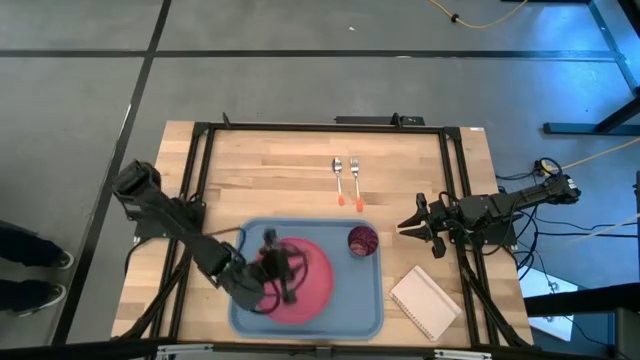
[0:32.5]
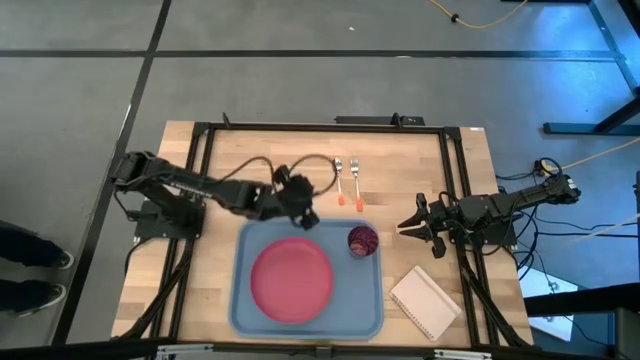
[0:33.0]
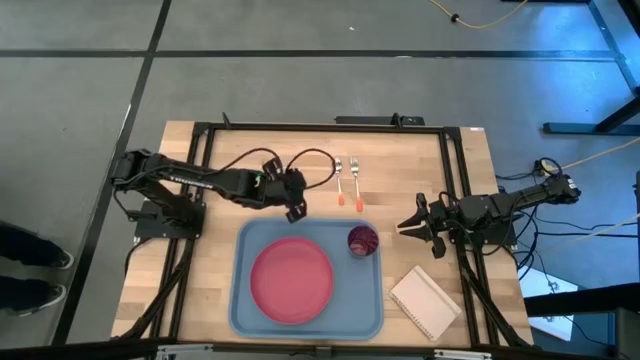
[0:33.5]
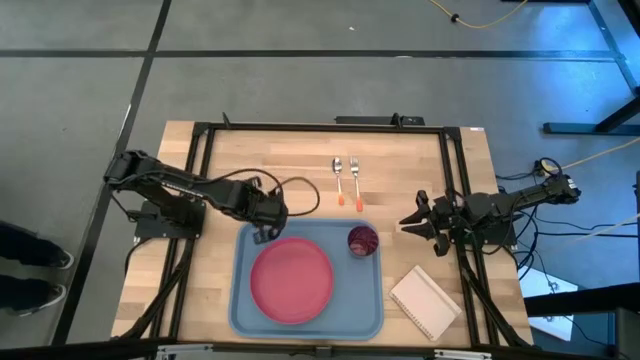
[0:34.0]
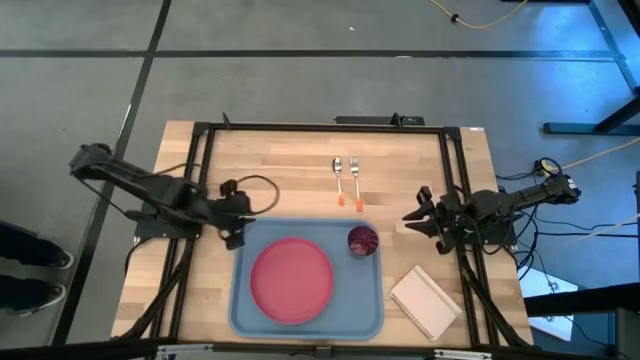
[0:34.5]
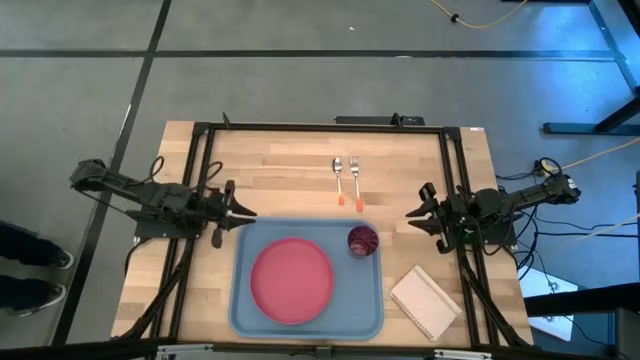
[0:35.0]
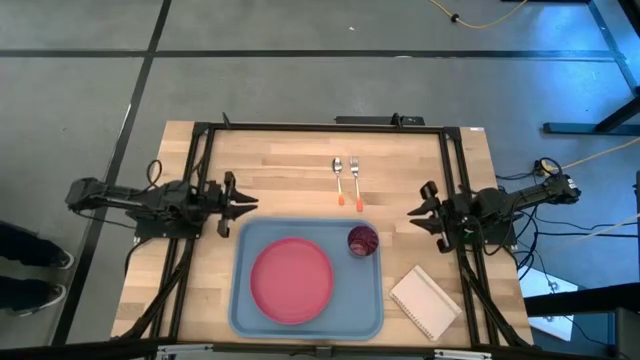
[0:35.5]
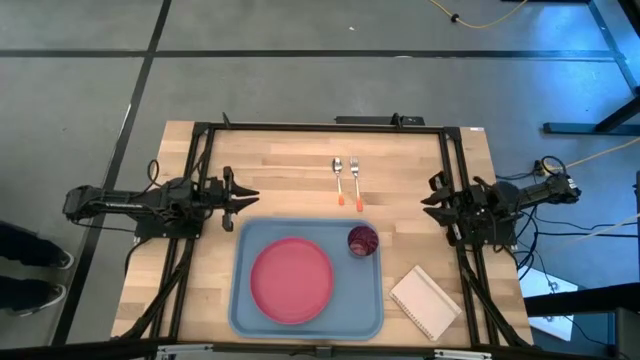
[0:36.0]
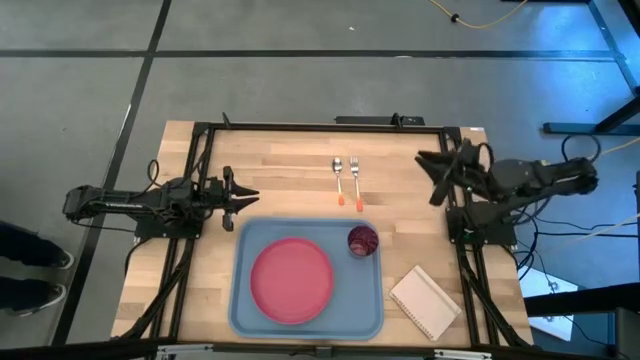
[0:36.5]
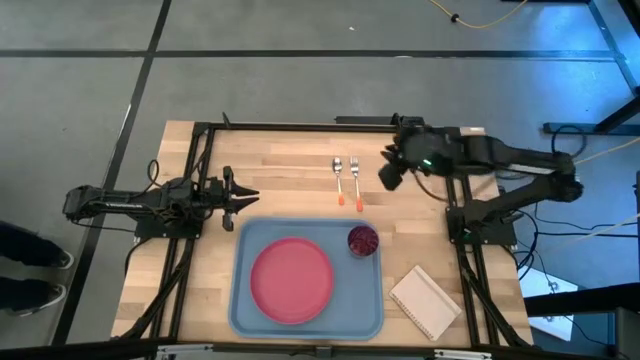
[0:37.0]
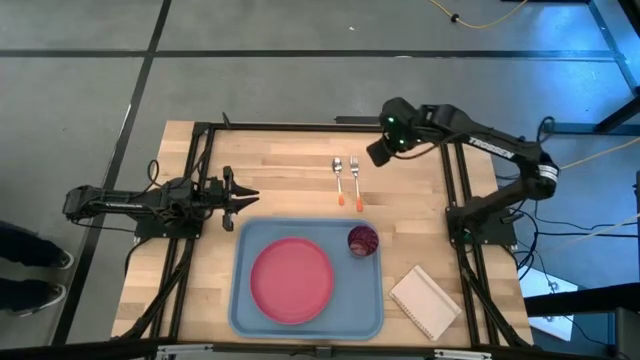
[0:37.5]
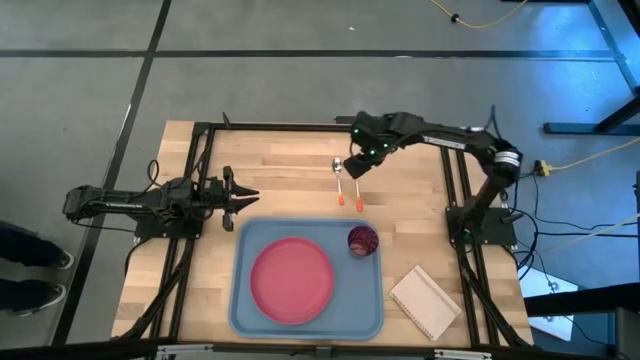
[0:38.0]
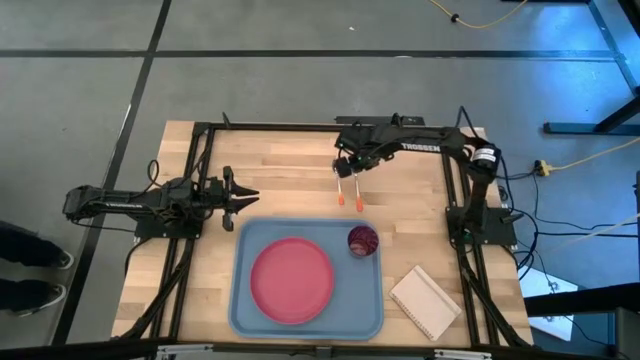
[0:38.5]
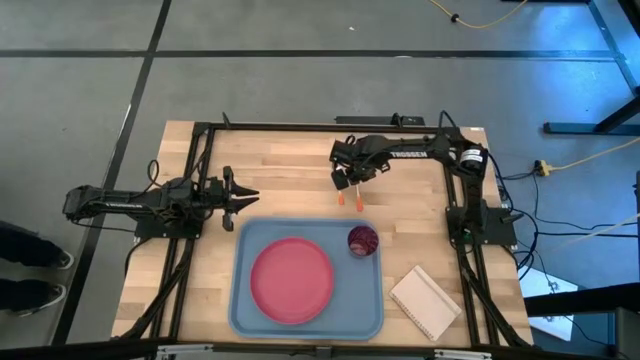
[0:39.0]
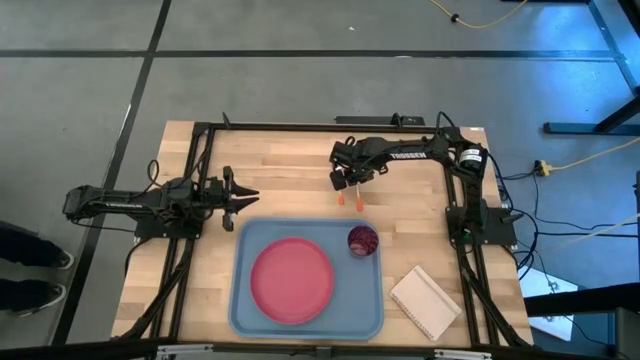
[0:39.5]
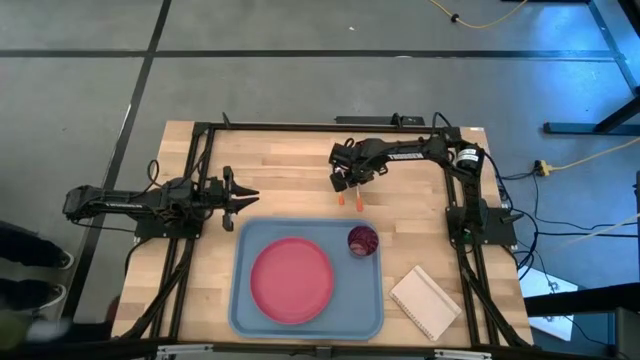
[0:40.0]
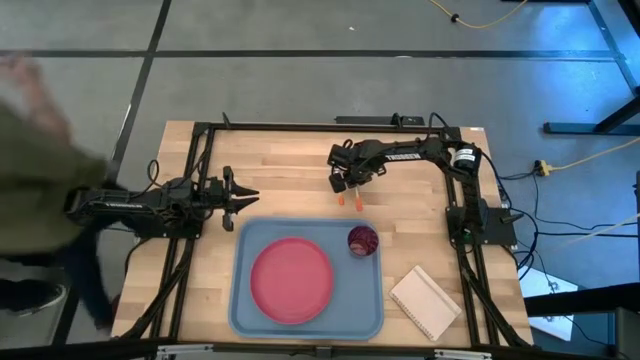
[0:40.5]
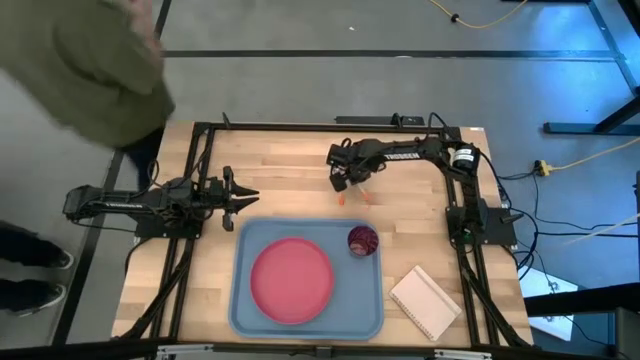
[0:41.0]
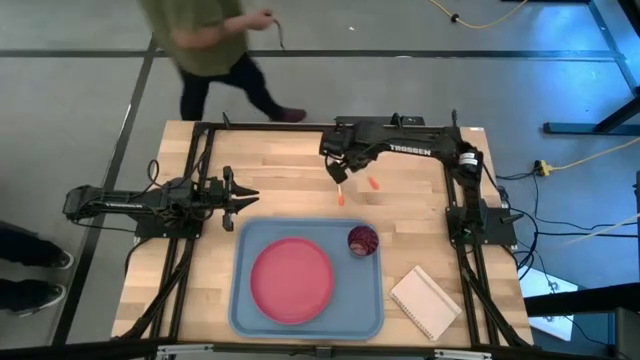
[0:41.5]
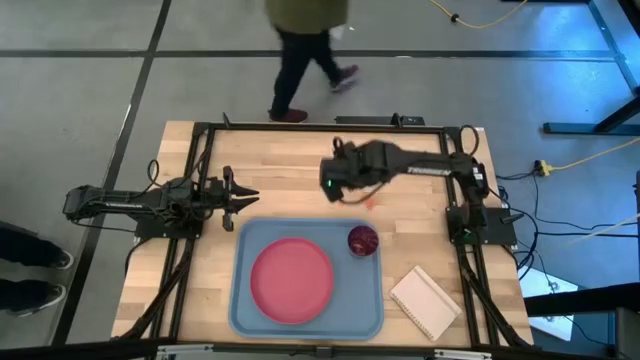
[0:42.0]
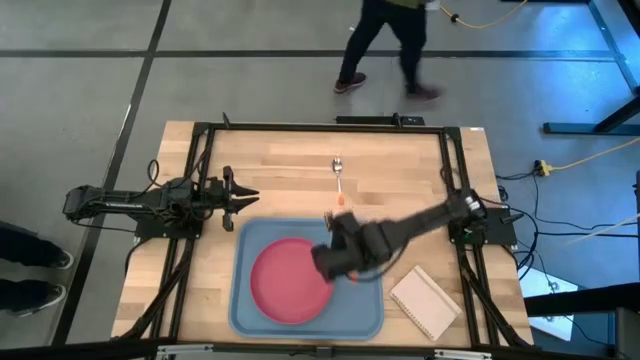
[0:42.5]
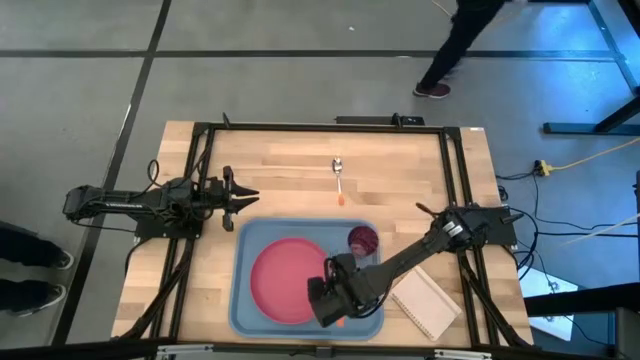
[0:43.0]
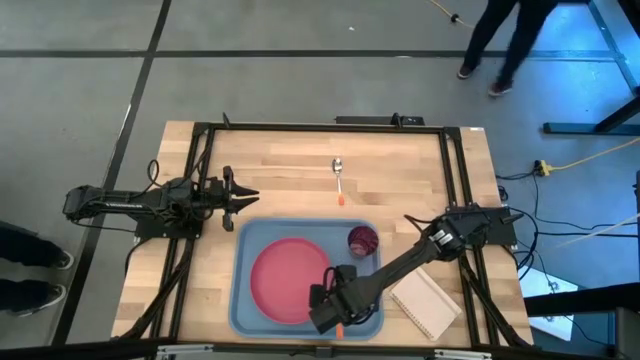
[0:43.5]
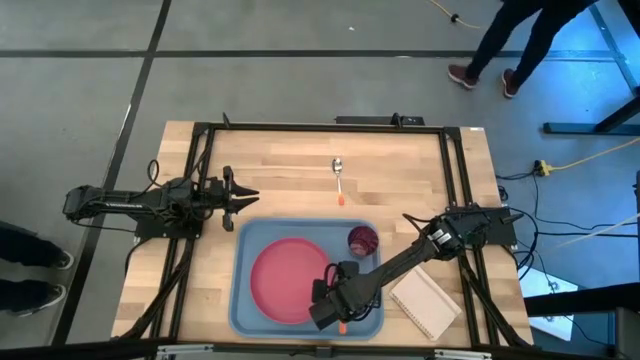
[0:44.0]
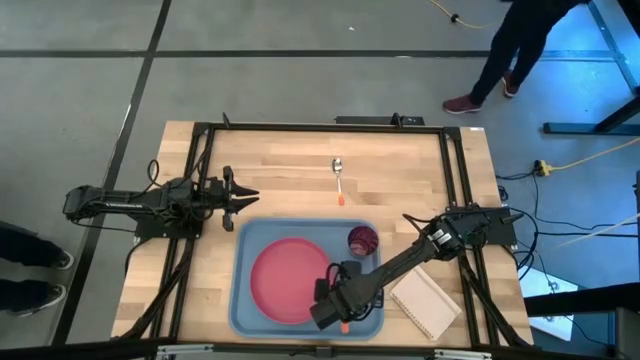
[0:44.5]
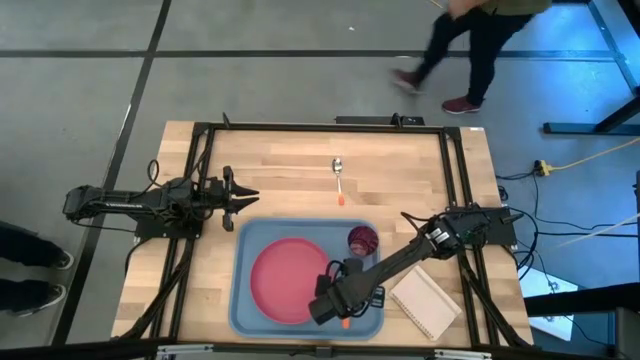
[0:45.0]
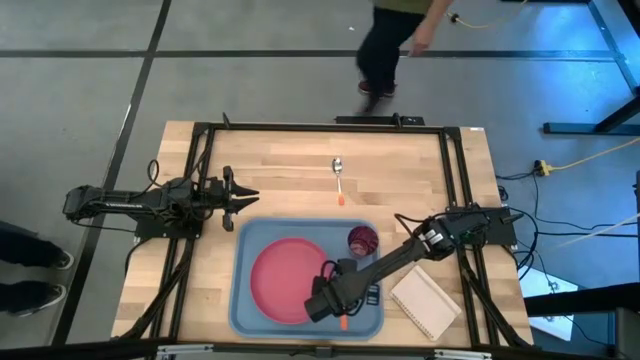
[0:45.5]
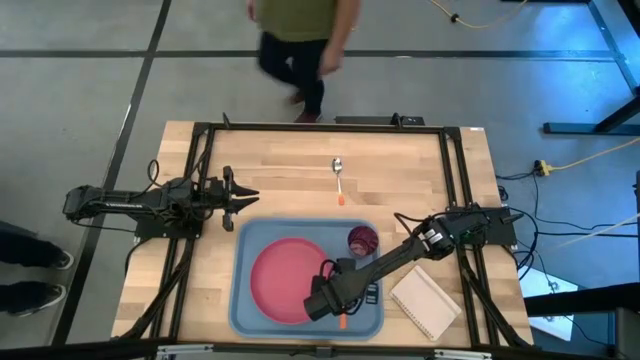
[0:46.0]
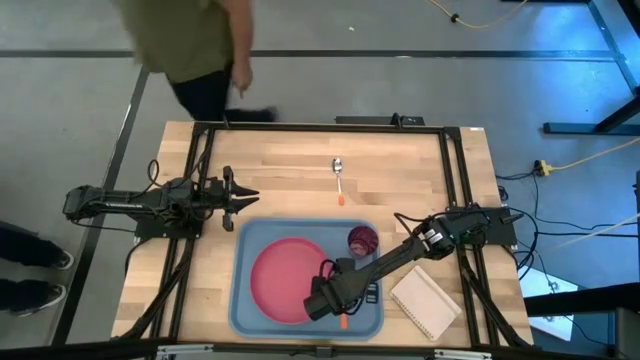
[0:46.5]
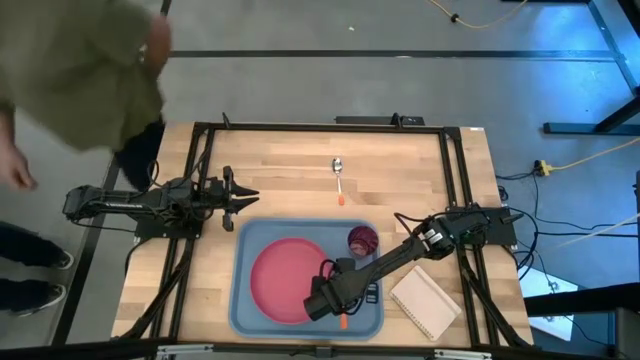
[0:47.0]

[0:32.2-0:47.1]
Task: Pick and place plate/cup/fork/spoon on tray
Put the white orange fork on the right side of the pink plate

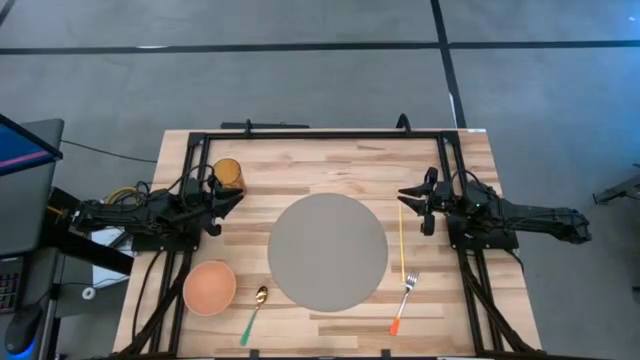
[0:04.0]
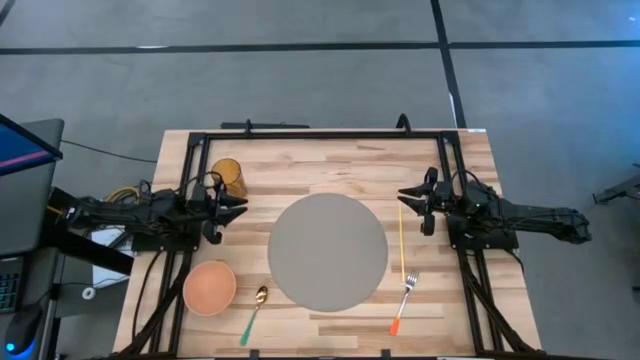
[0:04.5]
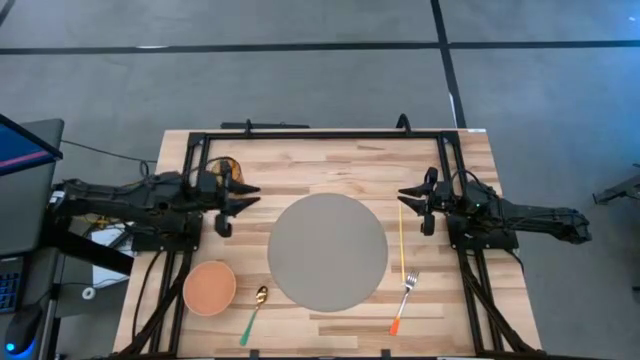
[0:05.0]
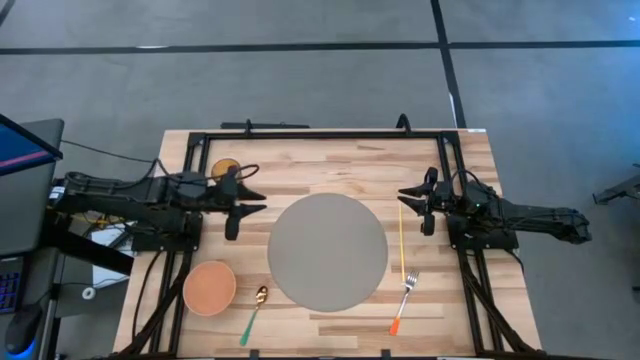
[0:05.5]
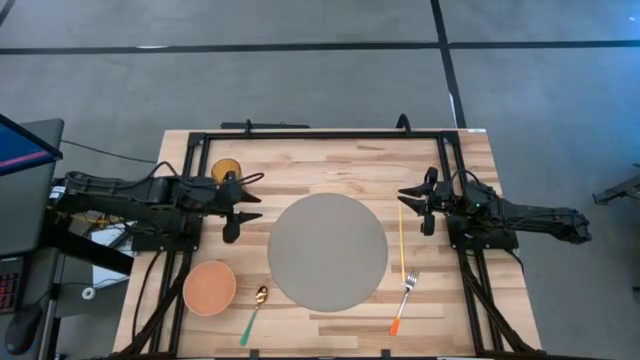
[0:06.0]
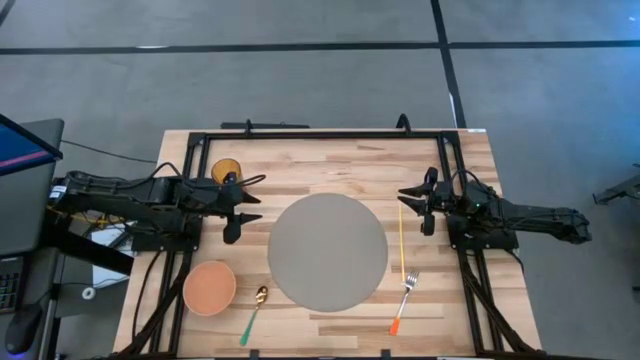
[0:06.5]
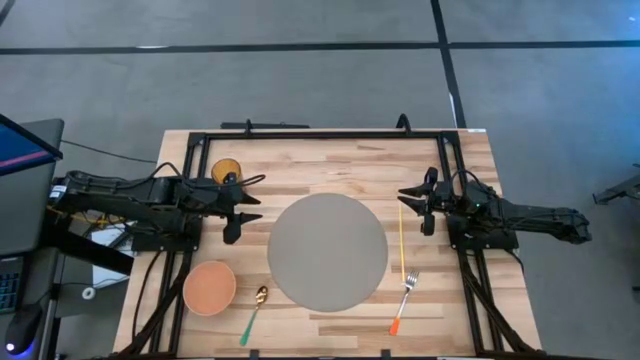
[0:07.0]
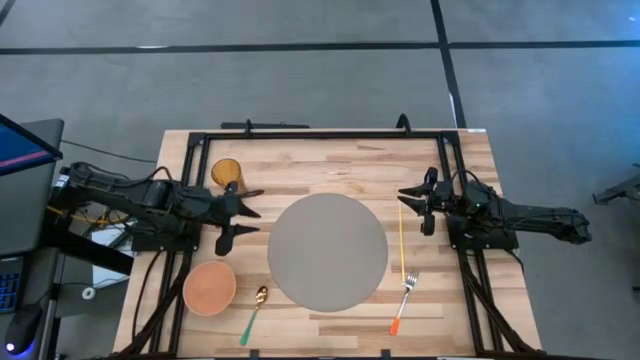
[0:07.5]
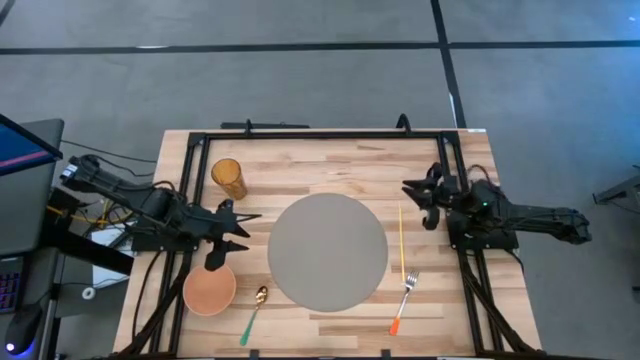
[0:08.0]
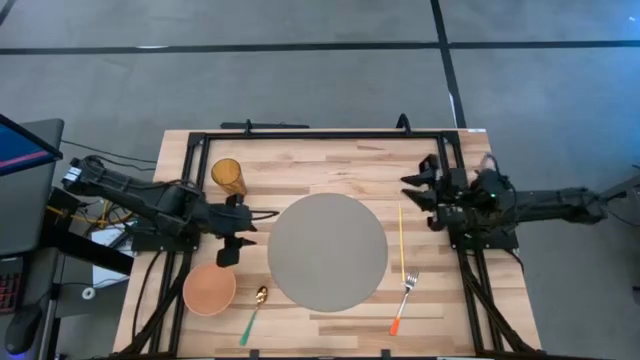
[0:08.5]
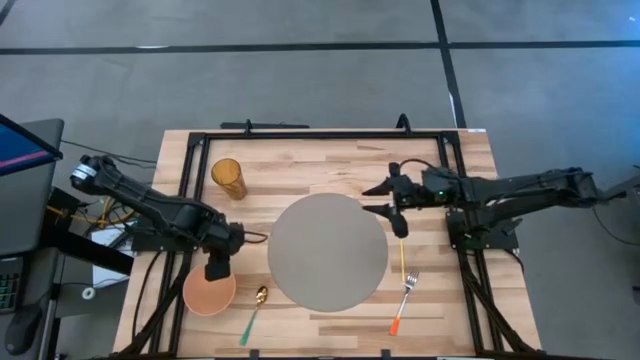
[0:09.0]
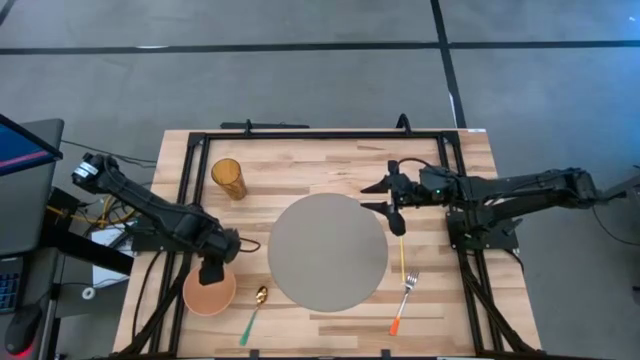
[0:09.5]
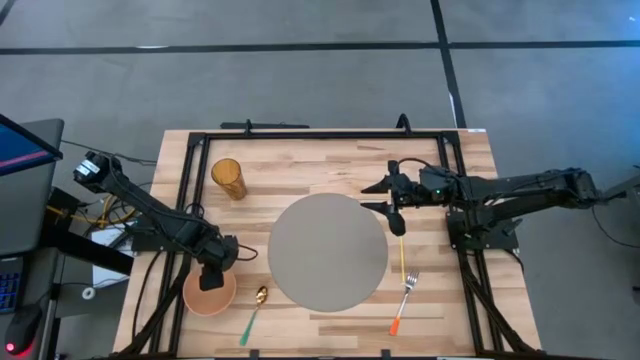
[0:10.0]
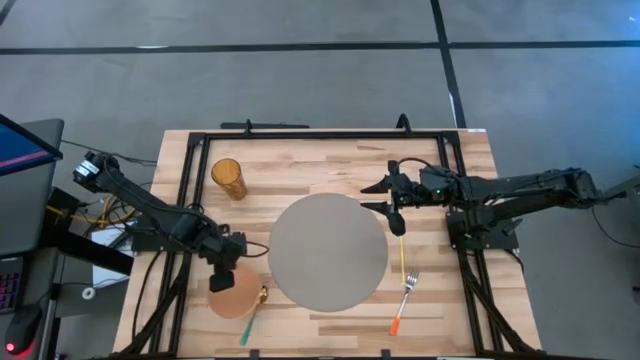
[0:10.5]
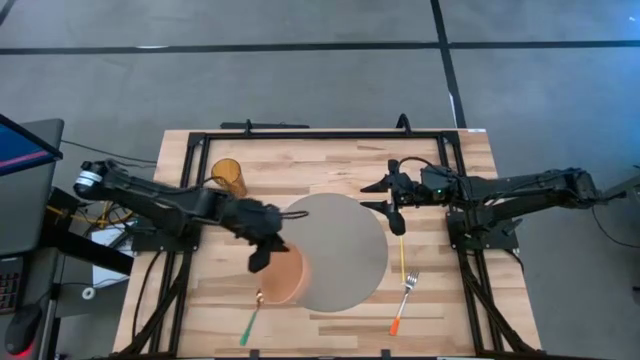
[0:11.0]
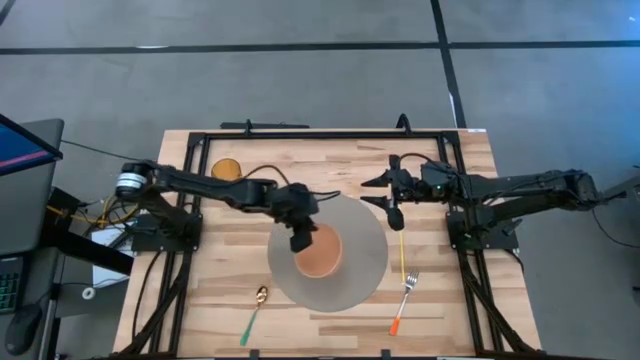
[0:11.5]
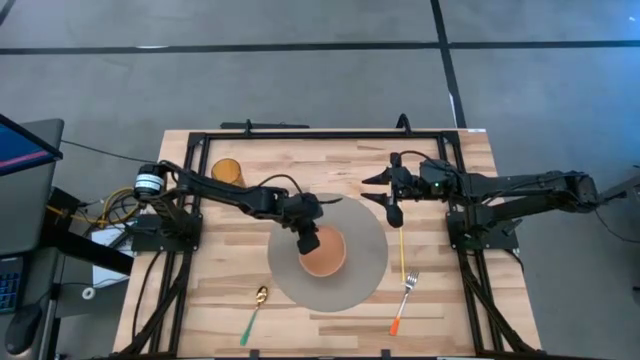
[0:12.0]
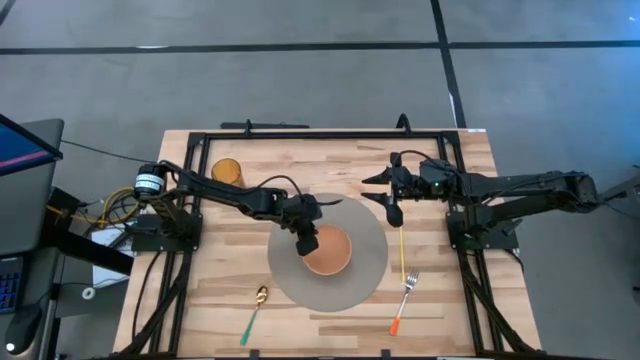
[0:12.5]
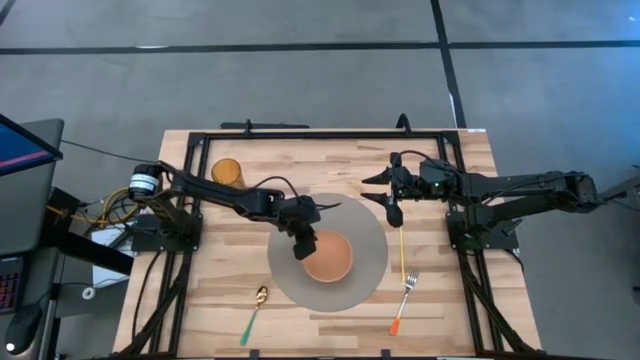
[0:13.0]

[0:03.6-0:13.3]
Task: Pick & Place Utensil
Put the pink bowl to the center of the gray tablemat
